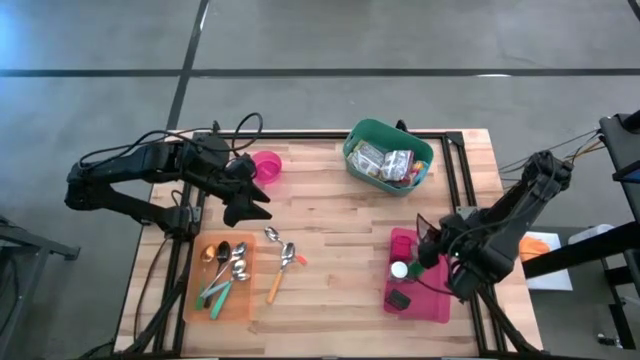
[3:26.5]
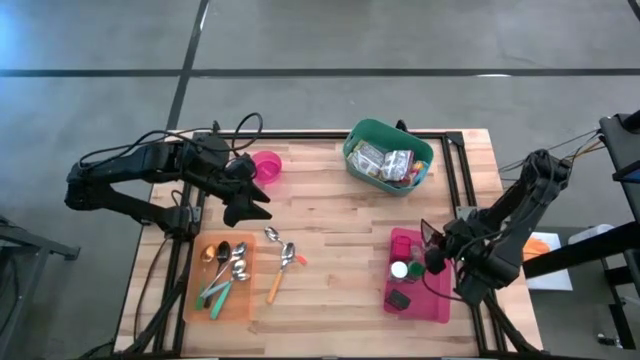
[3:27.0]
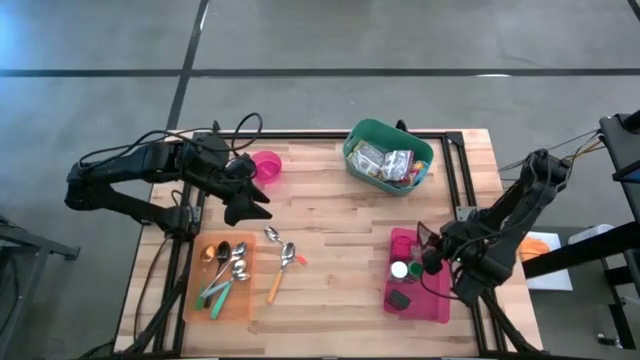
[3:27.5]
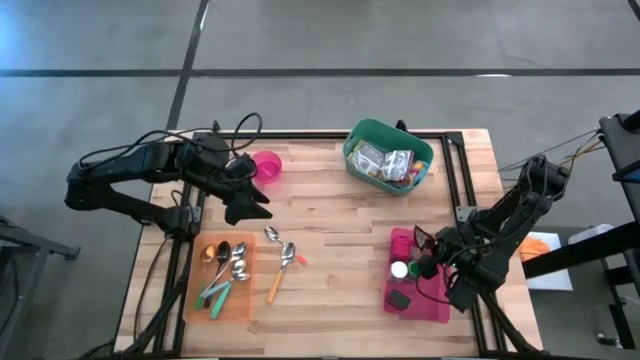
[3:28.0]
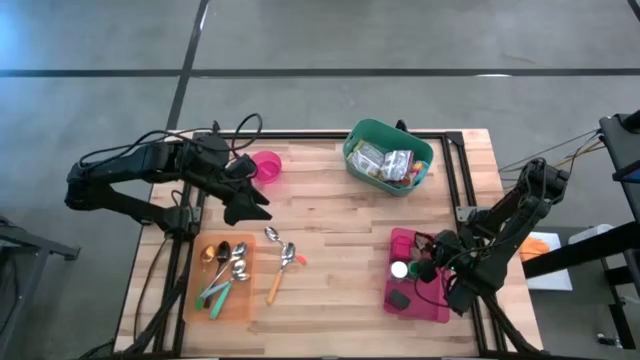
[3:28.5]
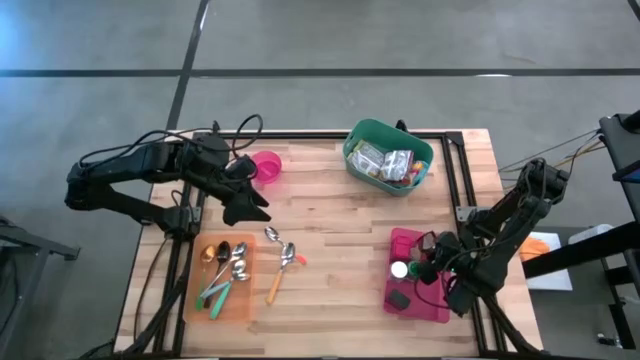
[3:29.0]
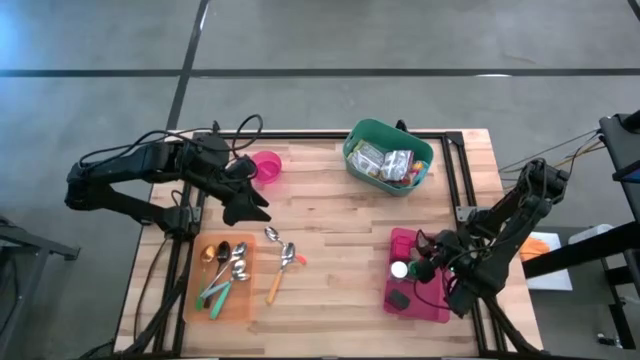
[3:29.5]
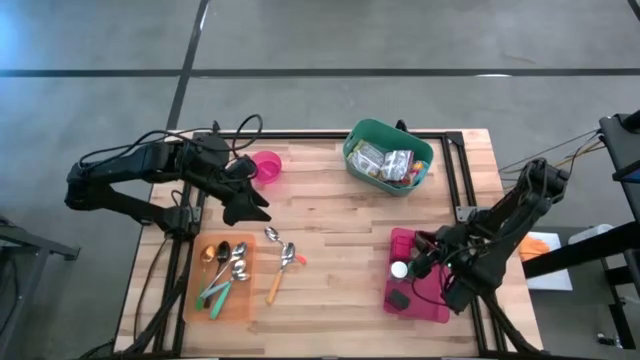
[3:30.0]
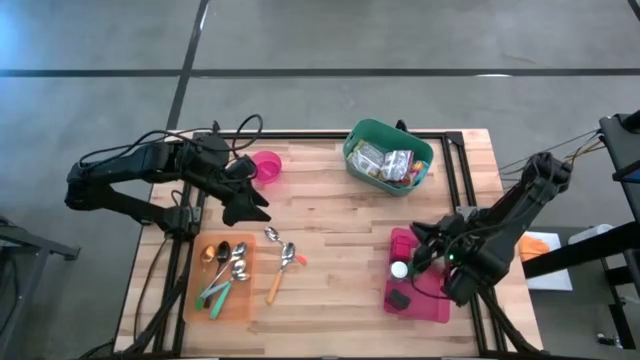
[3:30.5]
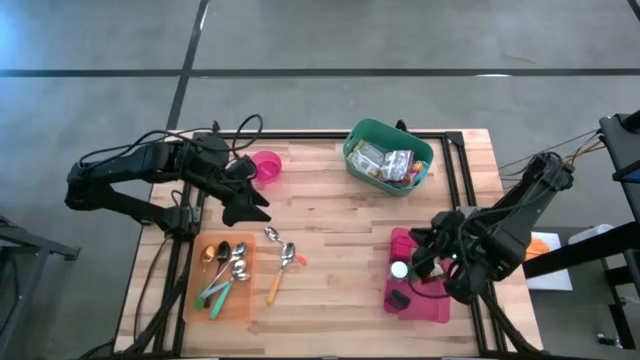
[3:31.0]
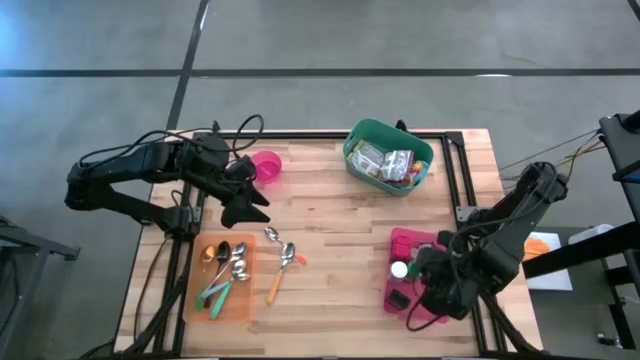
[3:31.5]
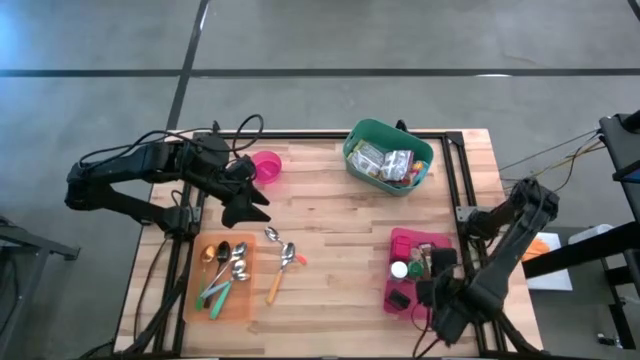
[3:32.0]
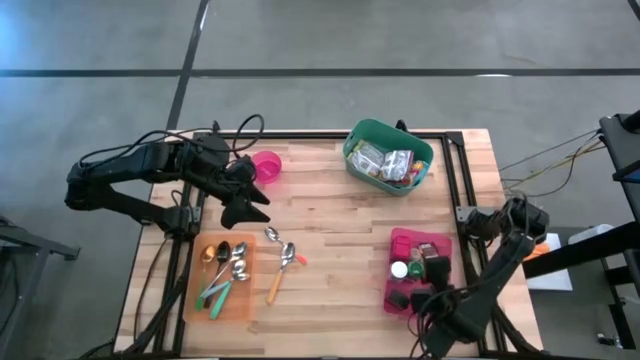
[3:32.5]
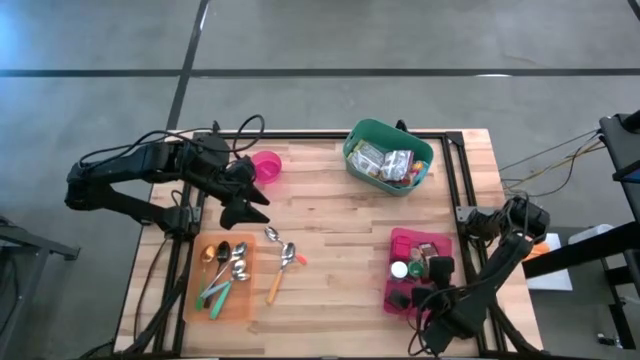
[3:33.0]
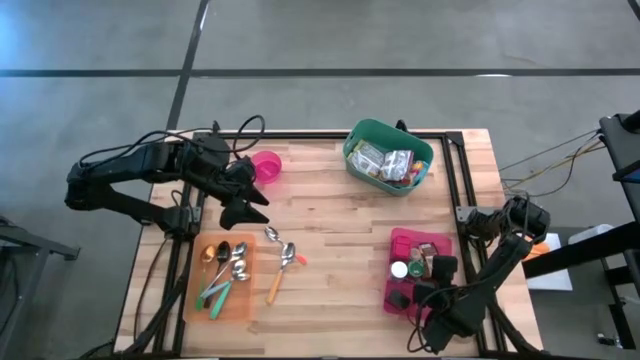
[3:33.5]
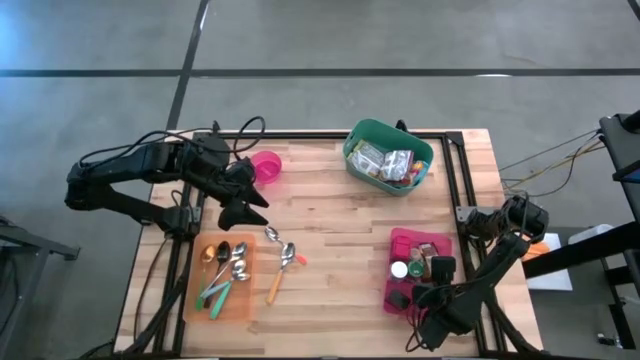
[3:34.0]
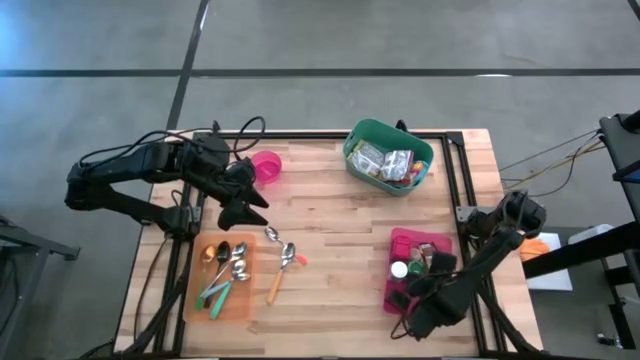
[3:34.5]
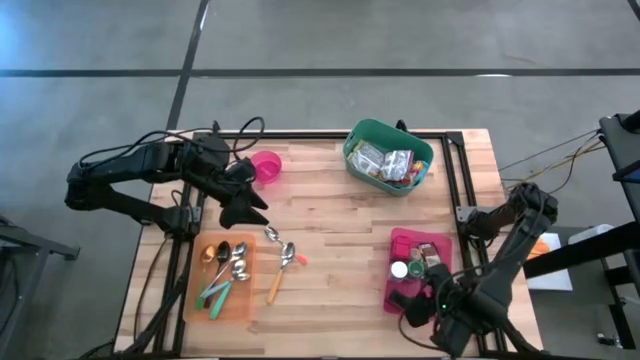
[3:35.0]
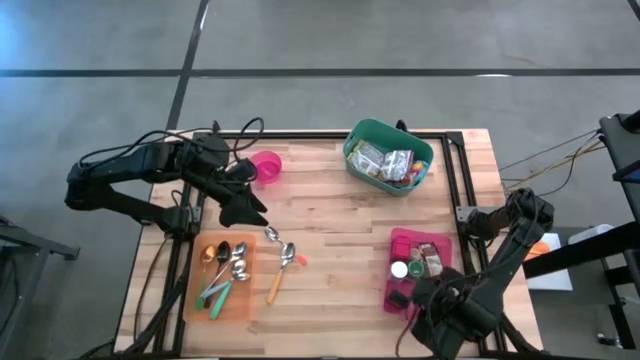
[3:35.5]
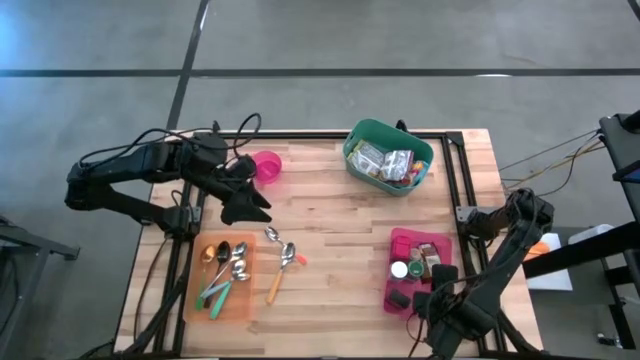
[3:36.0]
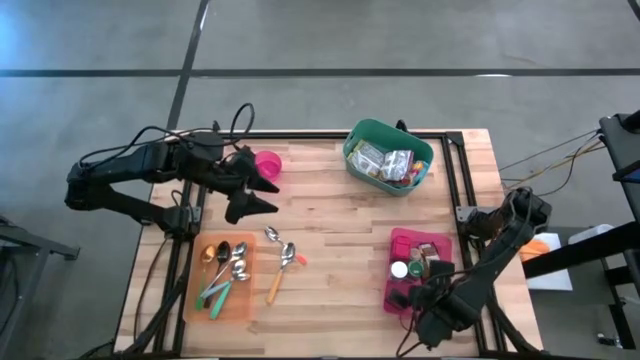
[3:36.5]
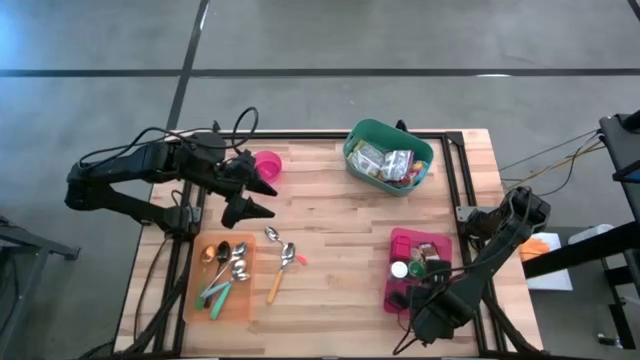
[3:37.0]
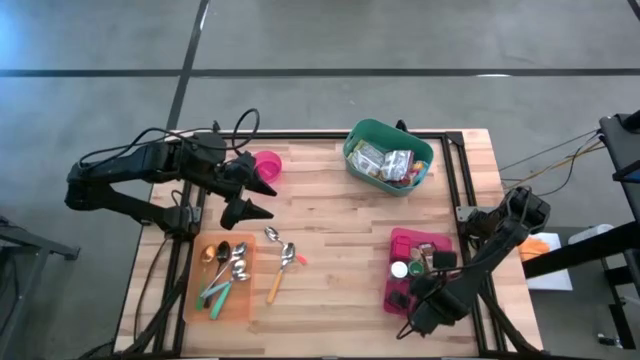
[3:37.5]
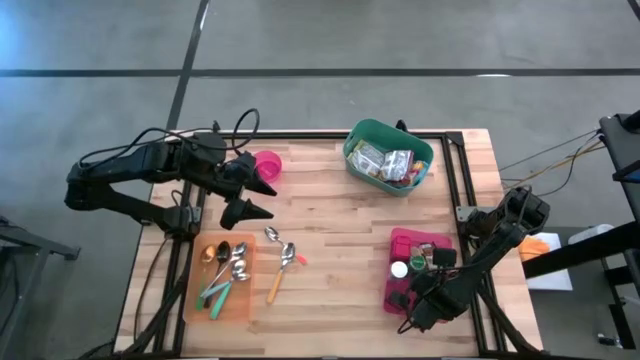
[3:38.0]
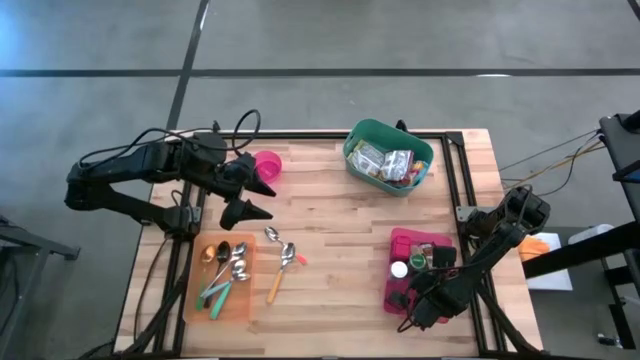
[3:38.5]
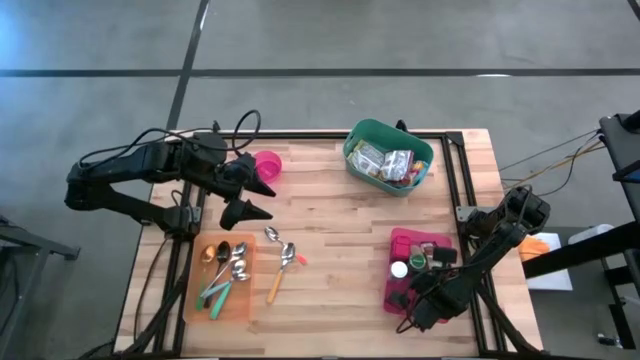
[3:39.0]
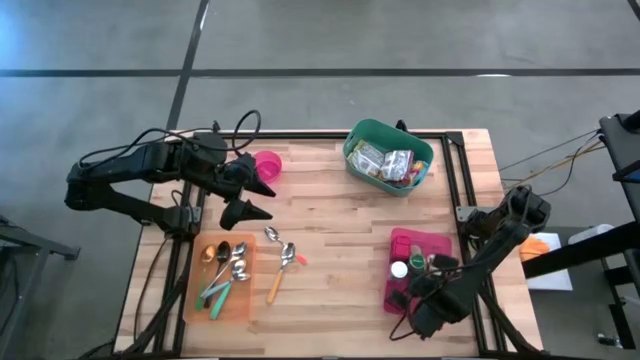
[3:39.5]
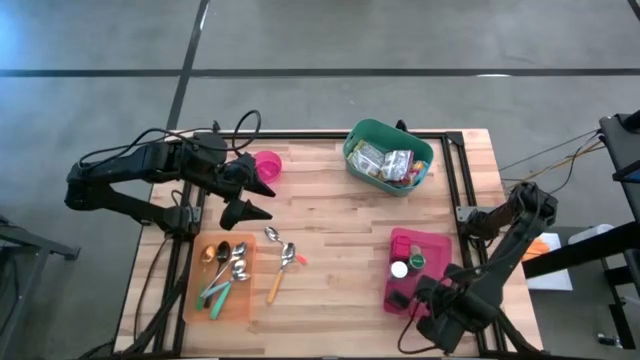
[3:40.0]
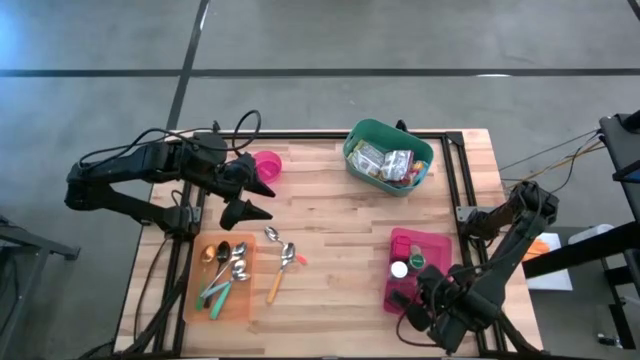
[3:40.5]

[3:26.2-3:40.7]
Task: Pick & Place Food Item
Put the orange seasoning bag into the pink bin

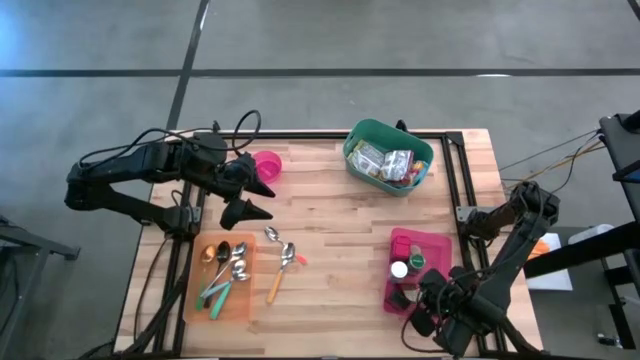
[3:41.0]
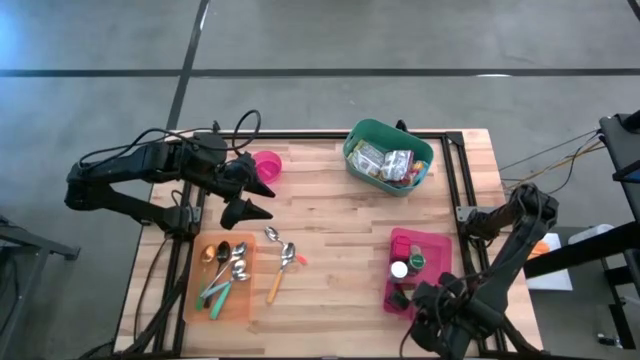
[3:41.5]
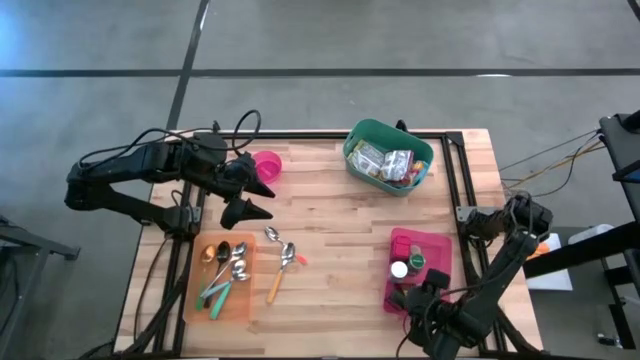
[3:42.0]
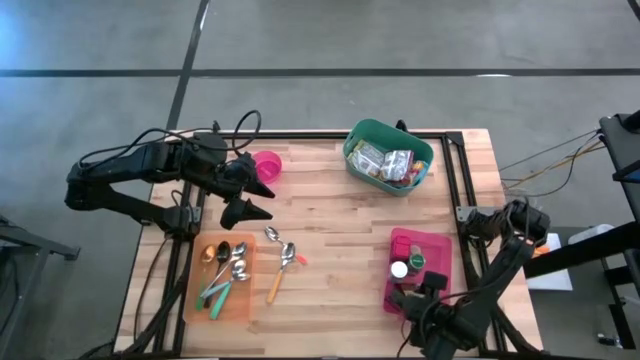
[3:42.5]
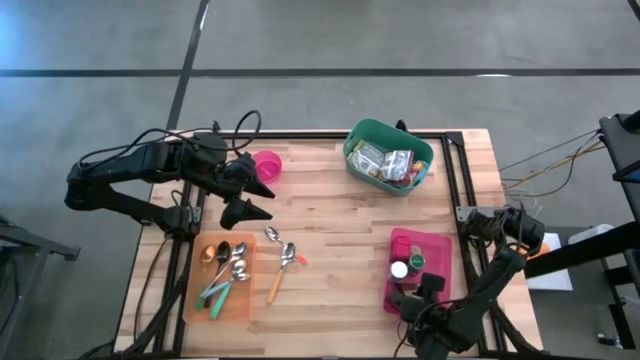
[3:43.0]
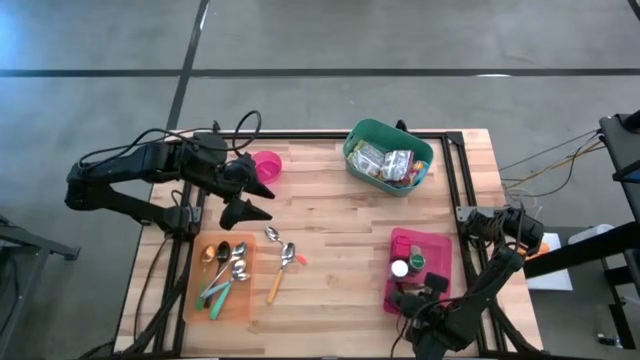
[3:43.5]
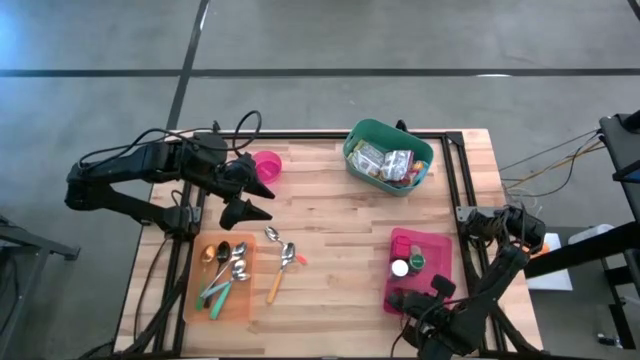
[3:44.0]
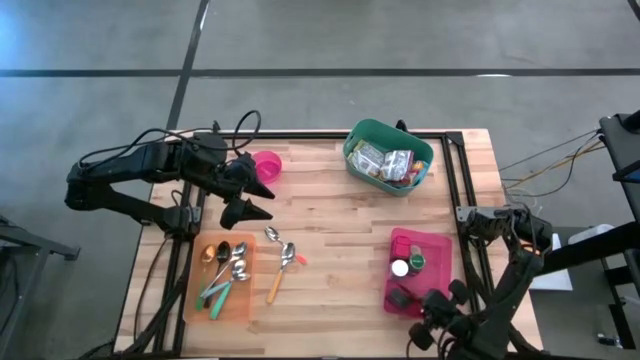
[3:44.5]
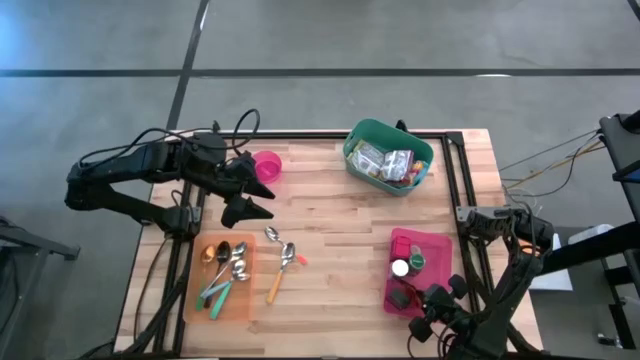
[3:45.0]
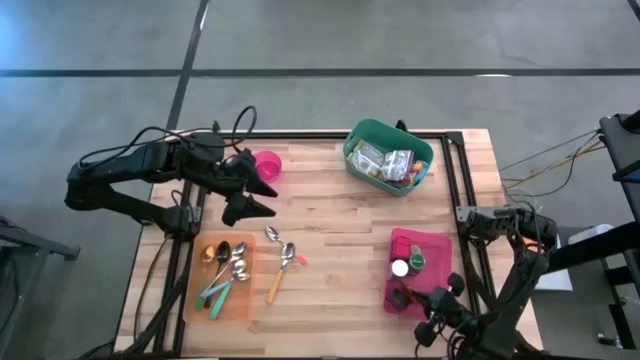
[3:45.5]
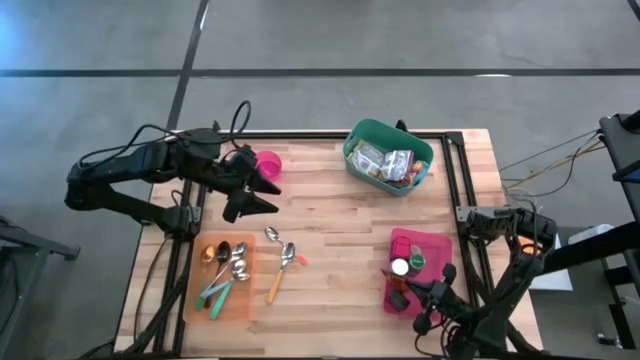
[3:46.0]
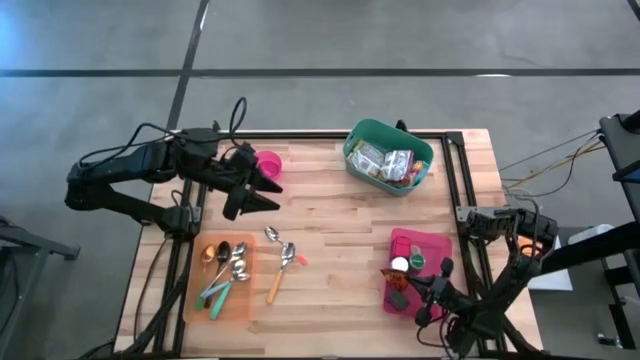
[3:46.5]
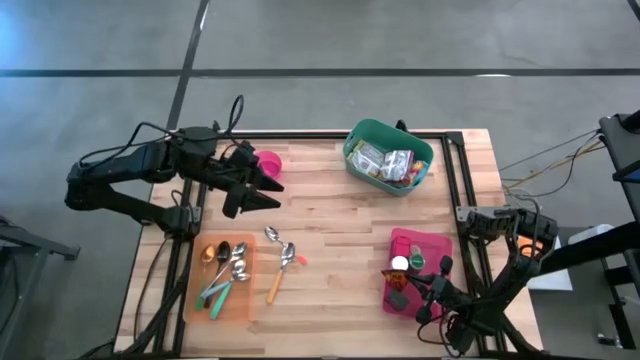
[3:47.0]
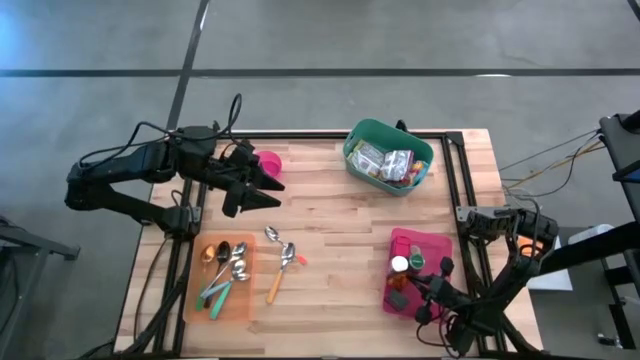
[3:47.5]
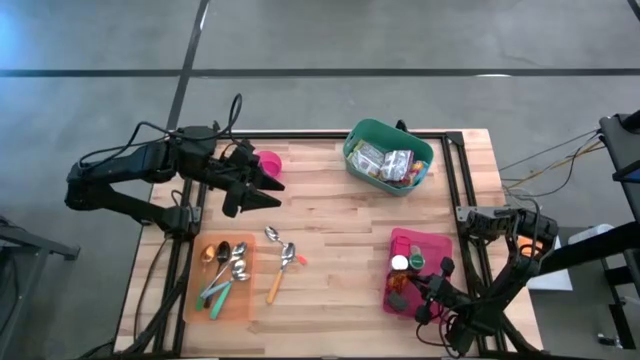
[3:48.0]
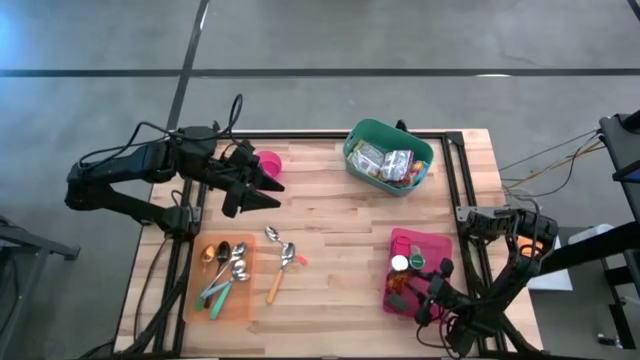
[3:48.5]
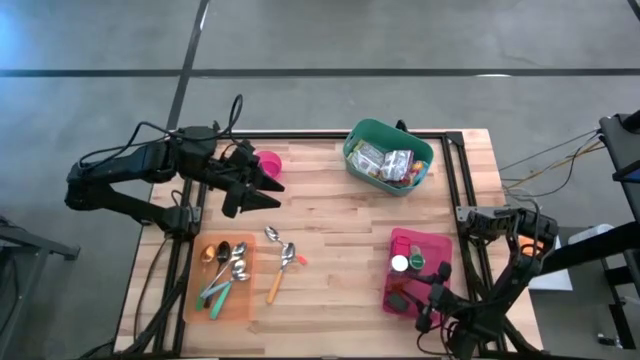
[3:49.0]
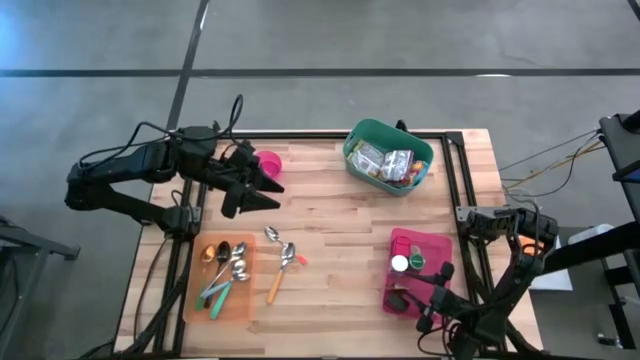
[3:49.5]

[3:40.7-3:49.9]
Put the orange seasoning bag into the pink bin
